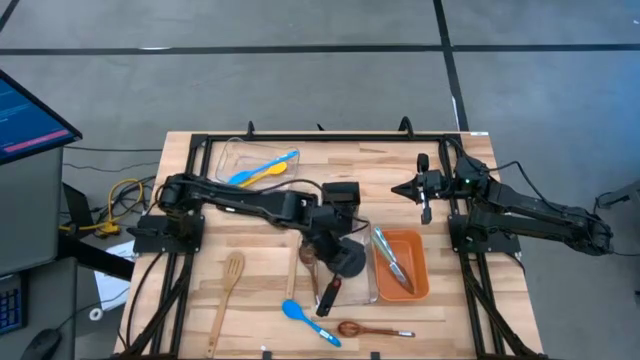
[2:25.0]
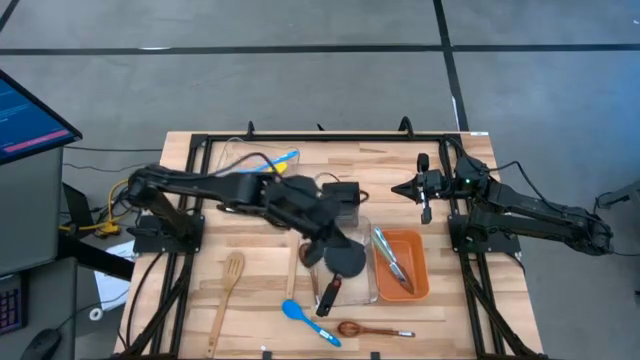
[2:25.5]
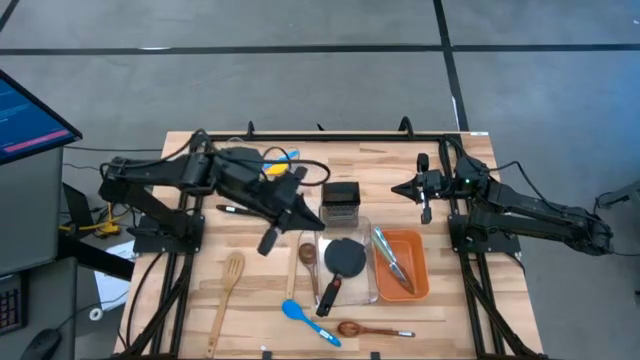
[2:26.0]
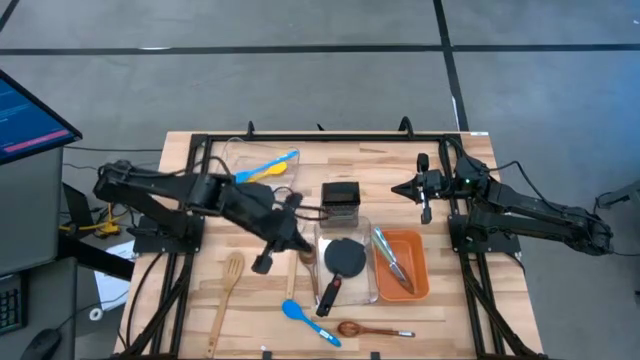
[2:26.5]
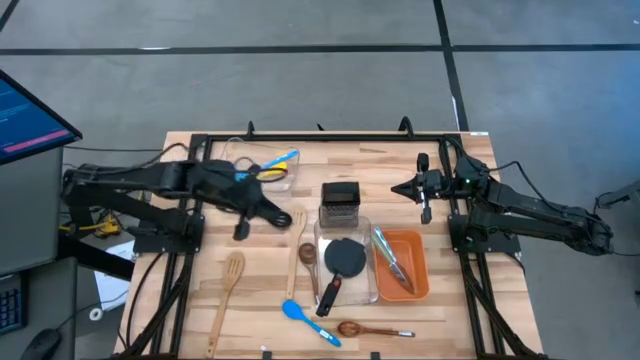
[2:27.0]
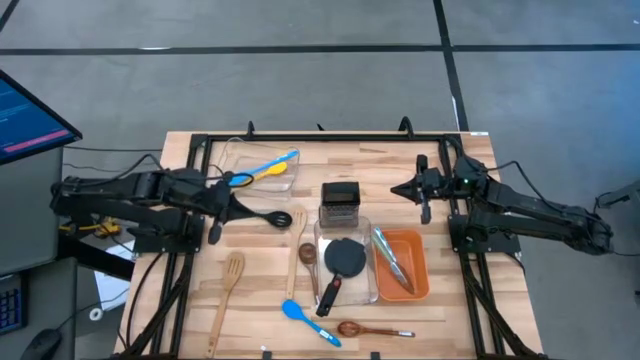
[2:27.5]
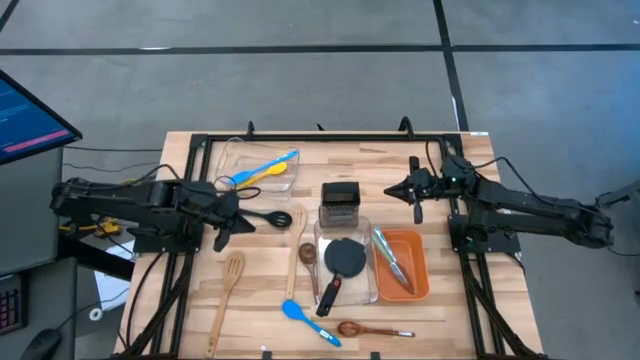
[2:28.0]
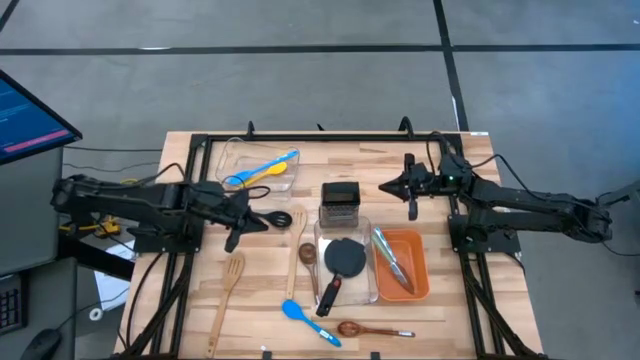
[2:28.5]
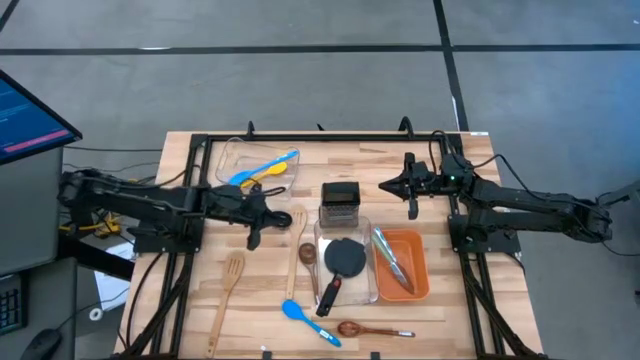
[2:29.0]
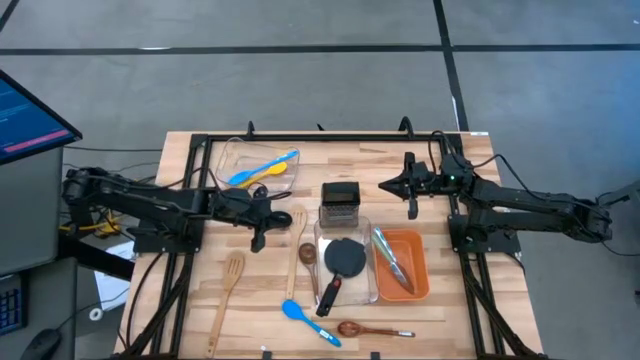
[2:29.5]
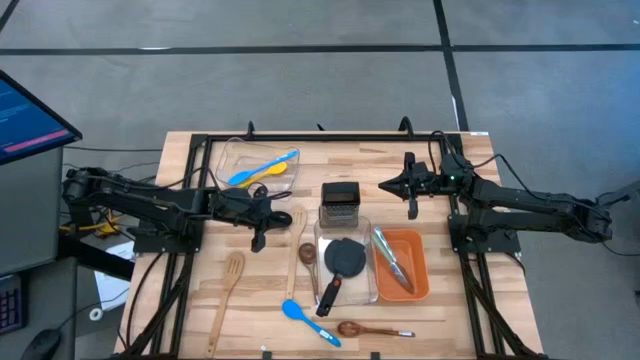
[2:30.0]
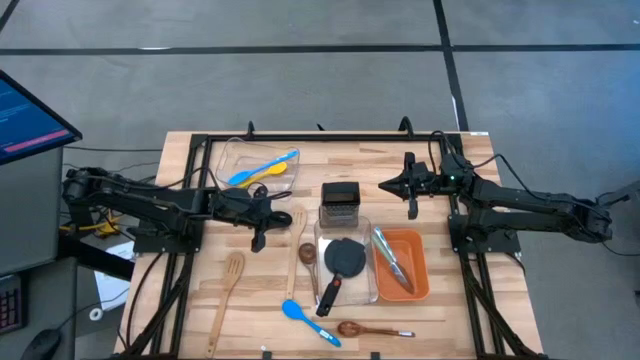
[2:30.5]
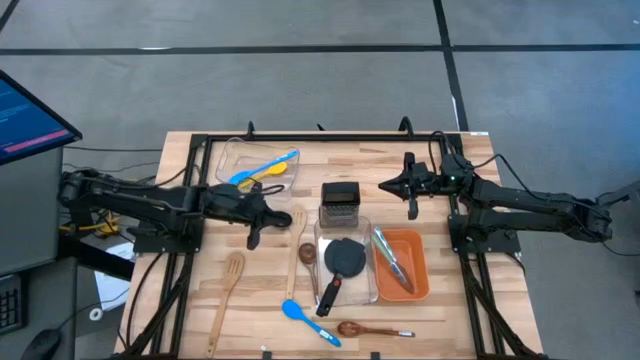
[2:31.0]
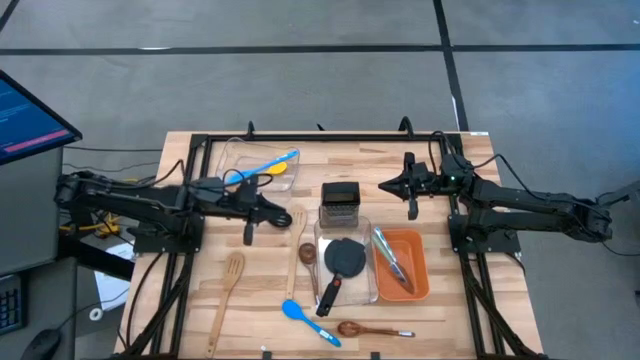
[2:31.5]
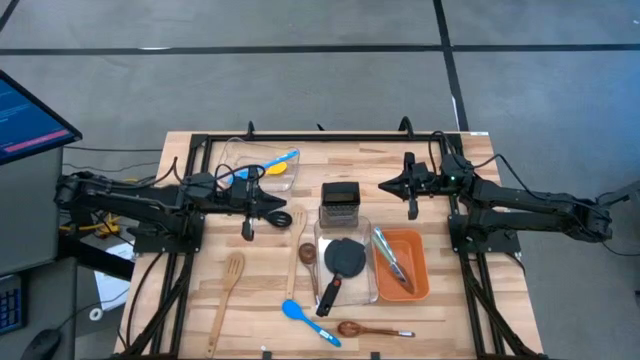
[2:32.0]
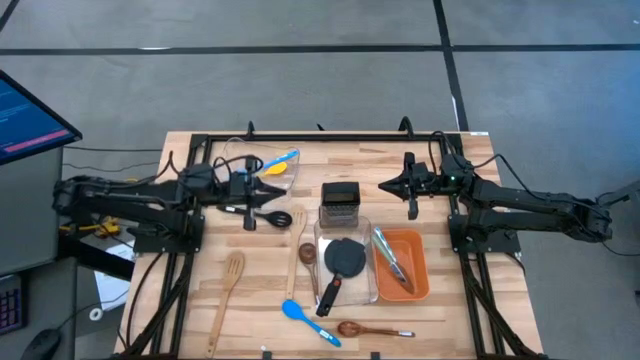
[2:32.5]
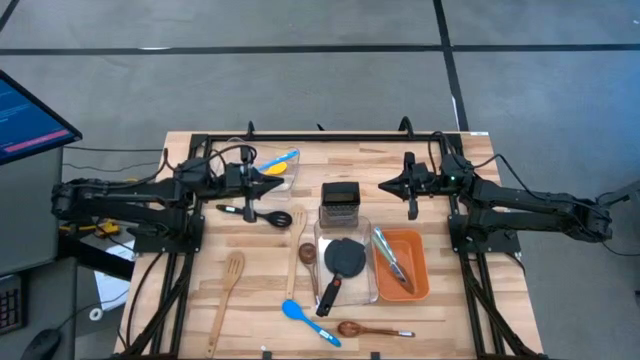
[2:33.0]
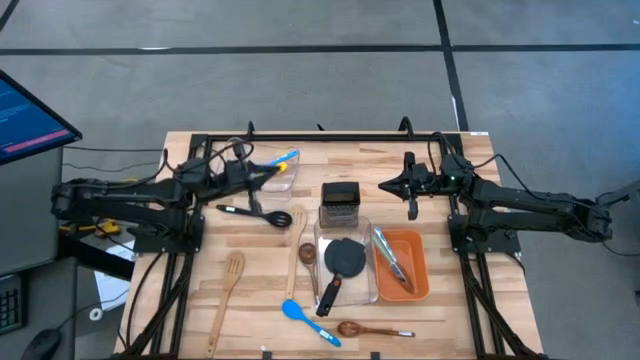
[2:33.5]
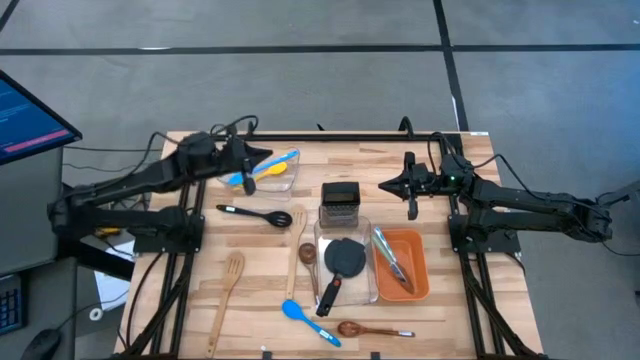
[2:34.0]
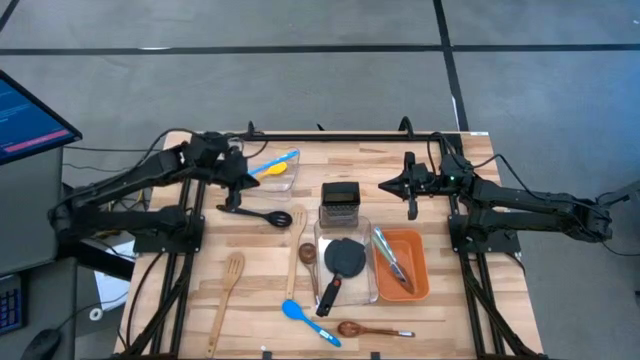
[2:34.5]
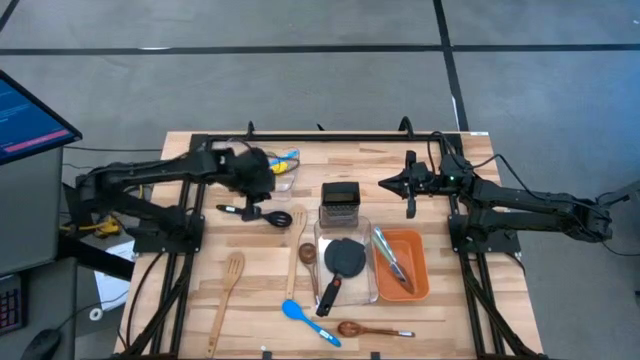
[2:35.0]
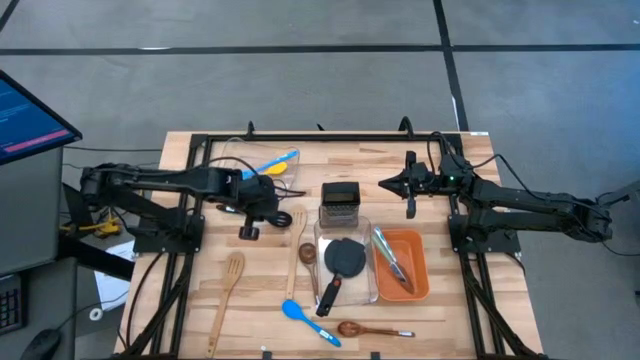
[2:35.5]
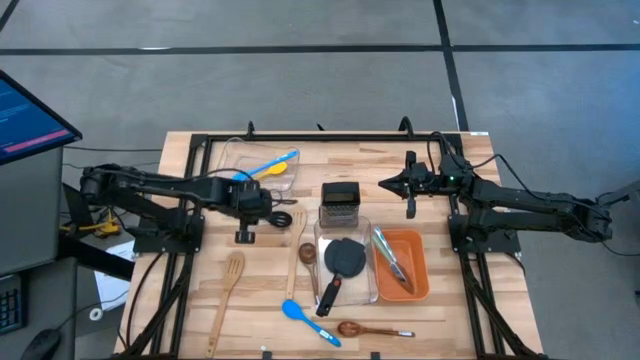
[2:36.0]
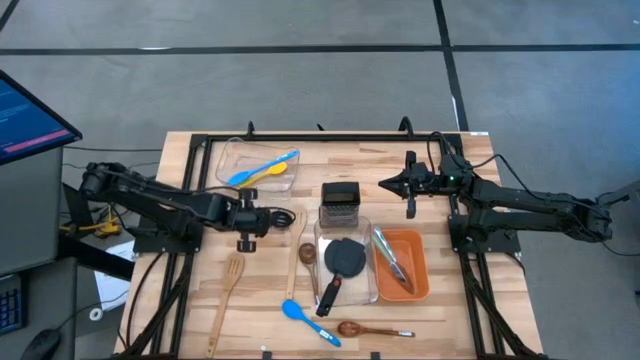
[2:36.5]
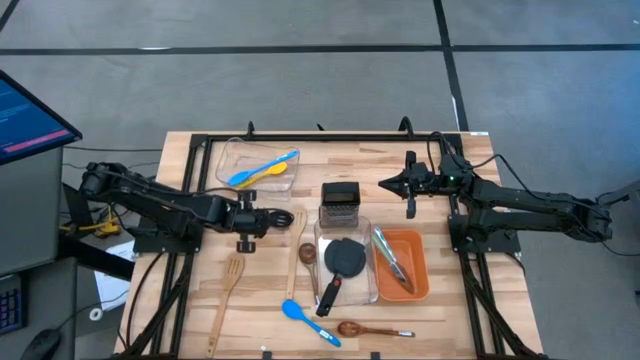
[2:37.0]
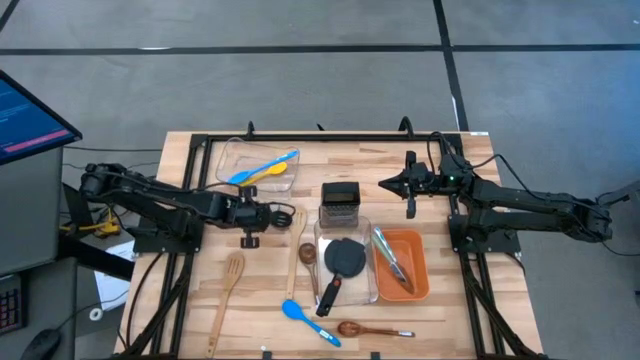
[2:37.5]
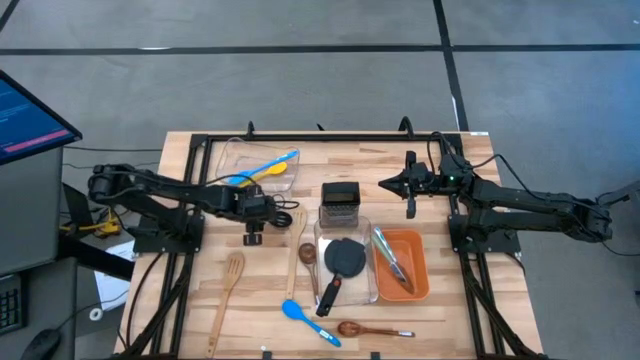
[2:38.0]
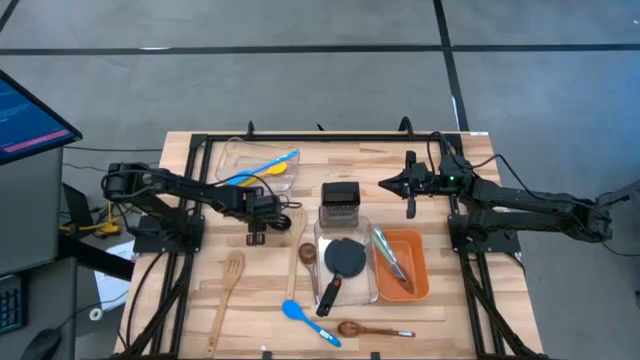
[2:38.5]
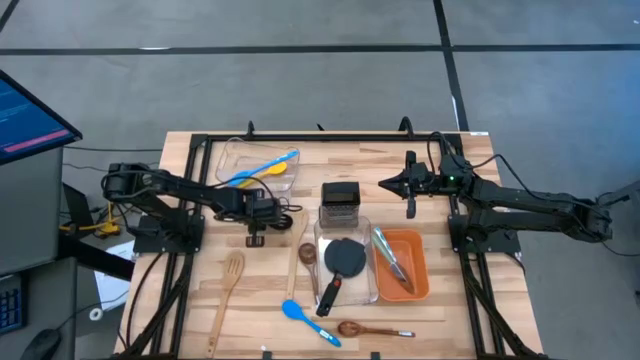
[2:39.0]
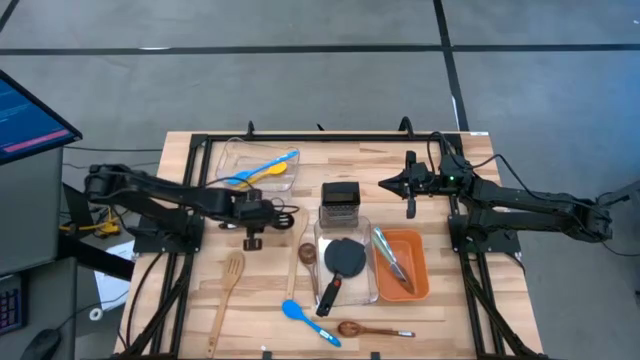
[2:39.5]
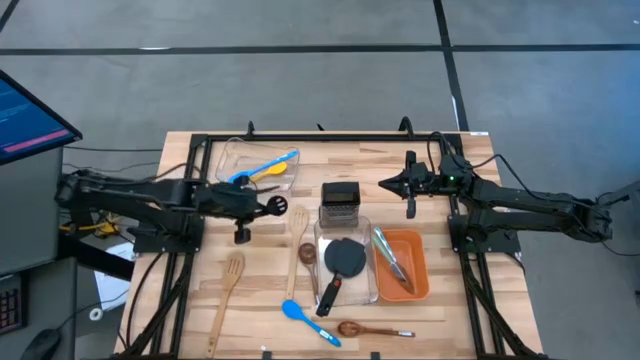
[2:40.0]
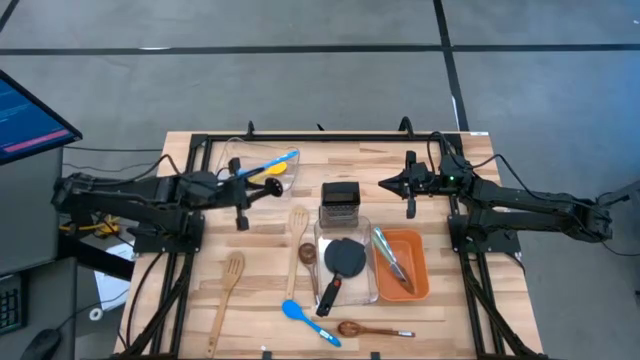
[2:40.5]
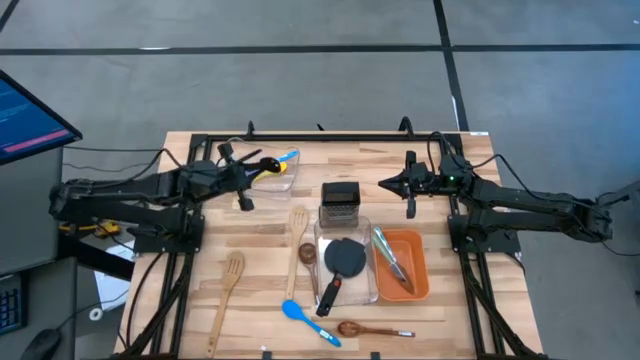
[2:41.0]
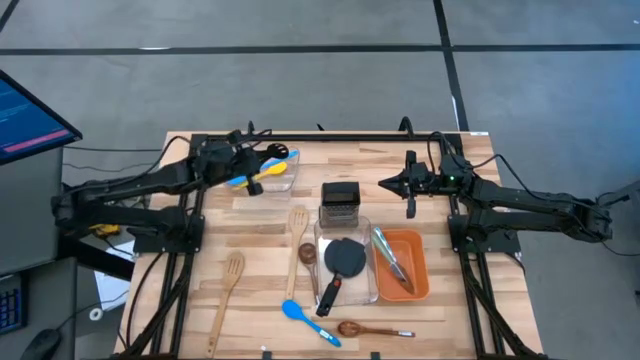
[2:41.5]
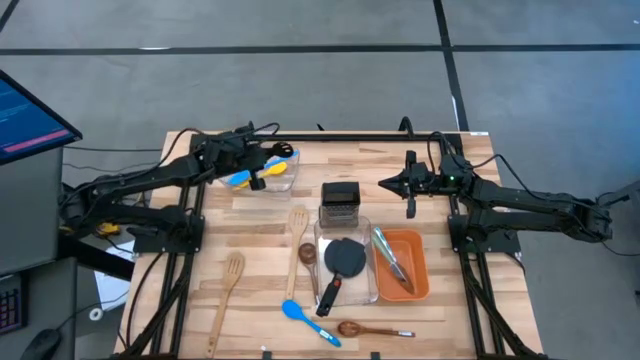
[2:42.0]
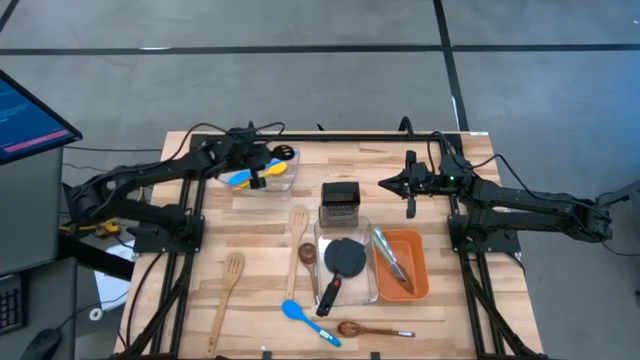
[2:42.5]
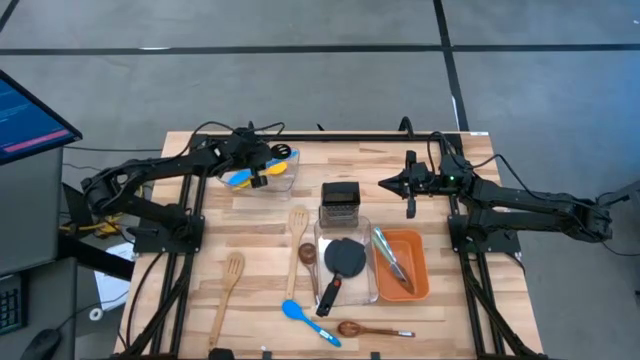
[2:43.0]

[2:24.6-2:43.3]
Task: Pick & Place Kitchen Items
Put the black ladle into the top transparent bin

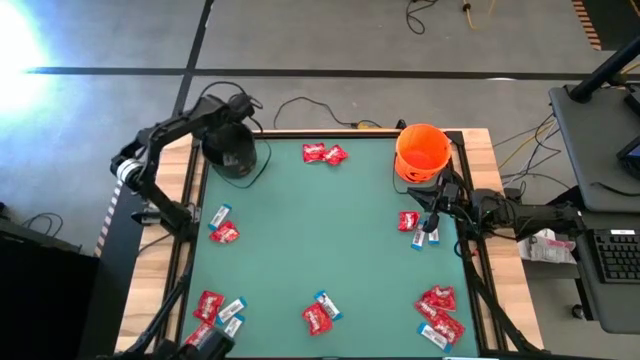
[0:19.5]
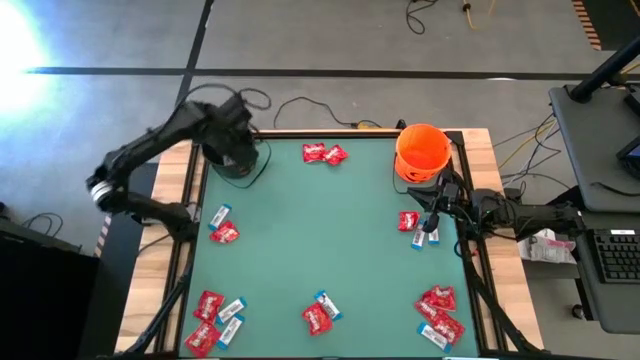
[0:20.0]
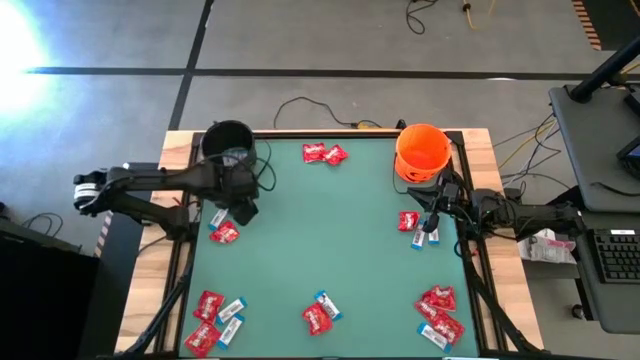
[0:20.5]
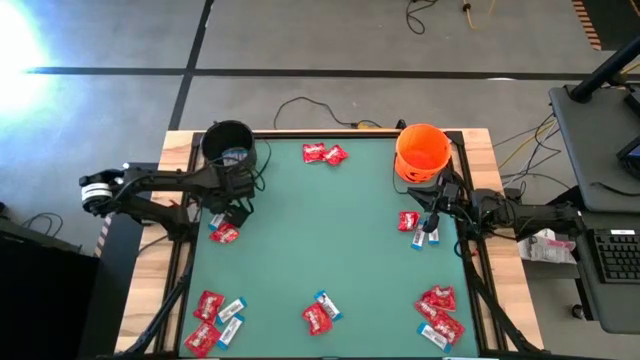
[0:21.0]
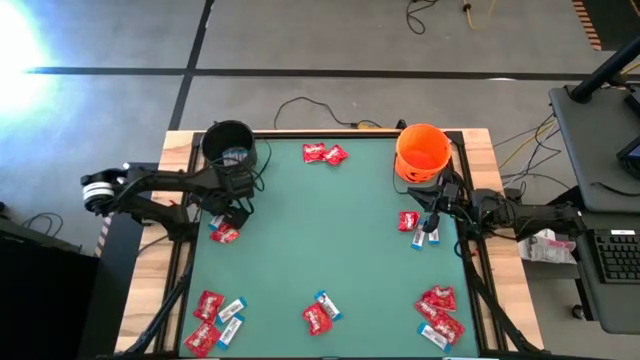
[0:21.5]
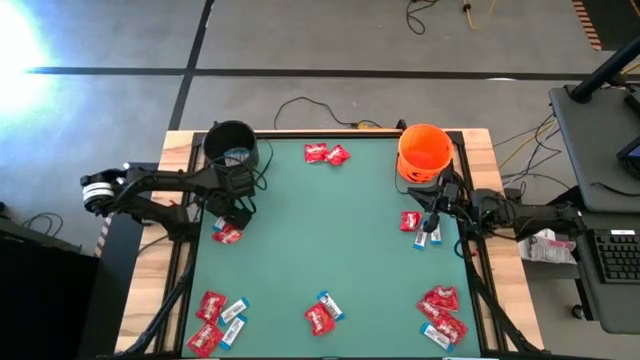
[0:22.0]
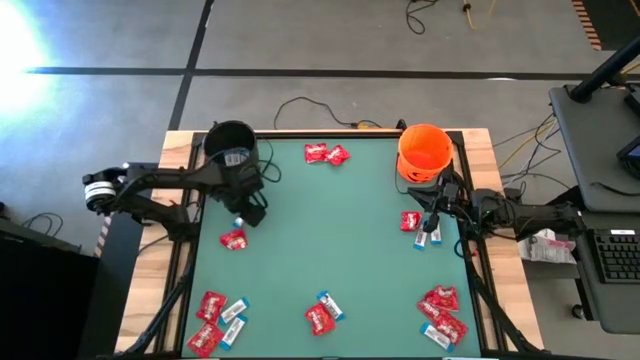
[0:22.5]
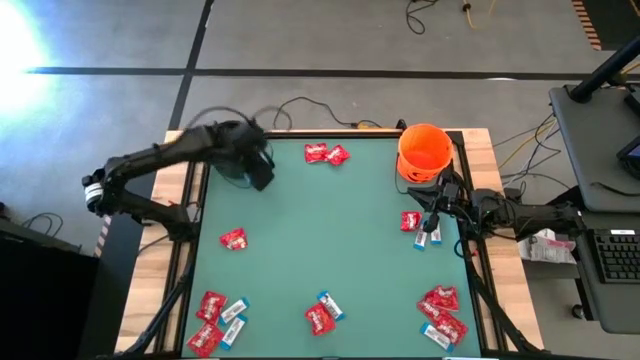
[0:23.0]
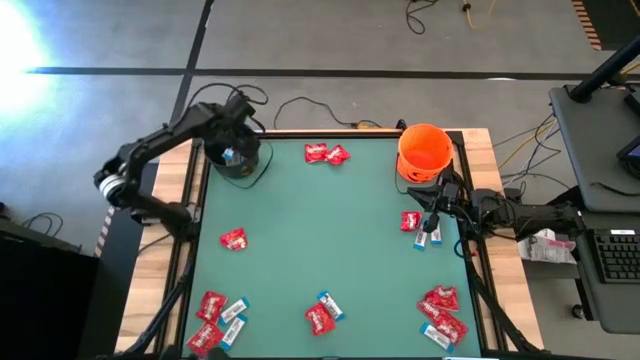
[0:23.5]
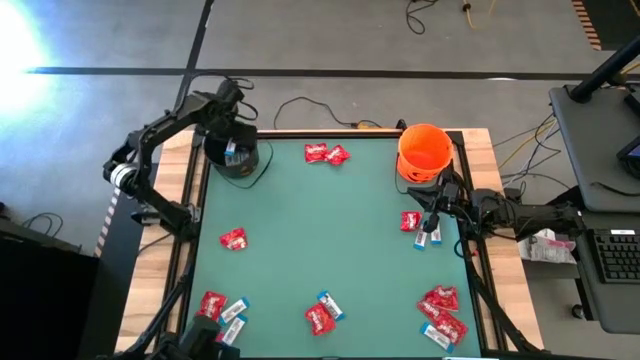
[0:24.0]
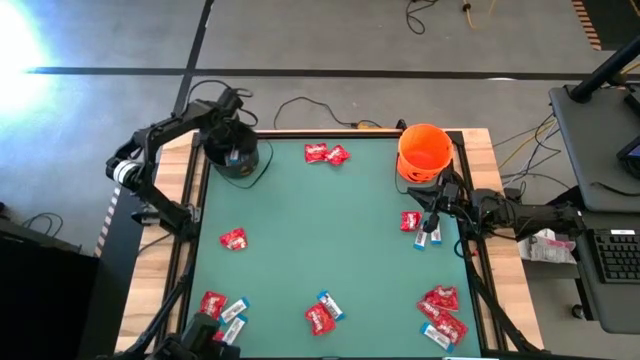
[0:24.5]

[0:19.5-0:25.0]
Task: Sort candy by brand, put in halloween buckets
Put the white chocolate into the black bucket
